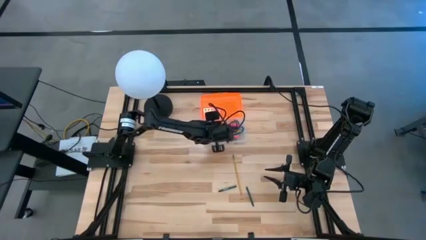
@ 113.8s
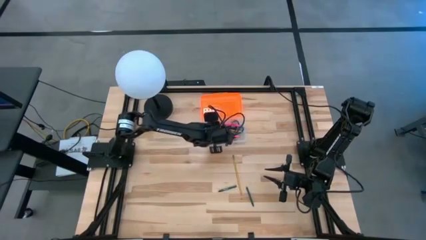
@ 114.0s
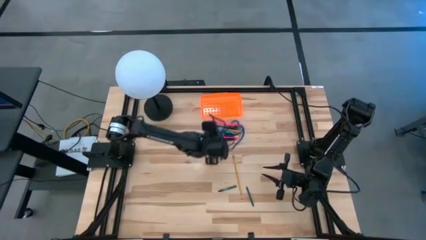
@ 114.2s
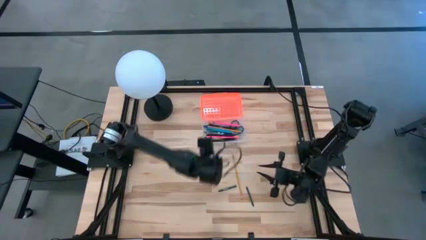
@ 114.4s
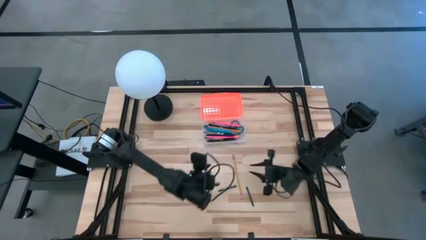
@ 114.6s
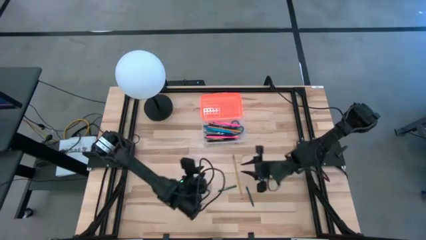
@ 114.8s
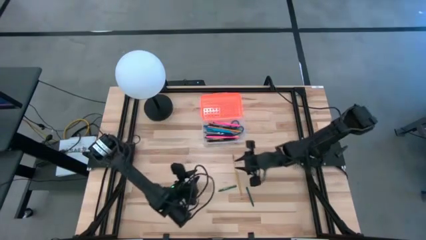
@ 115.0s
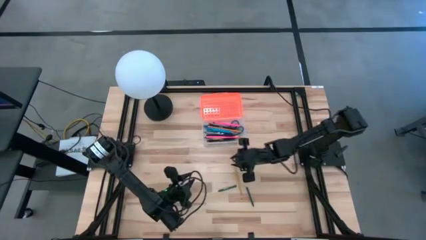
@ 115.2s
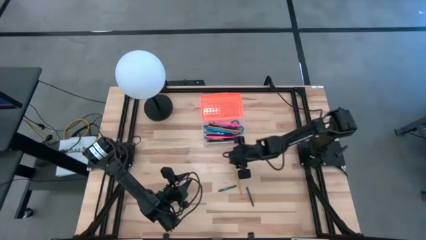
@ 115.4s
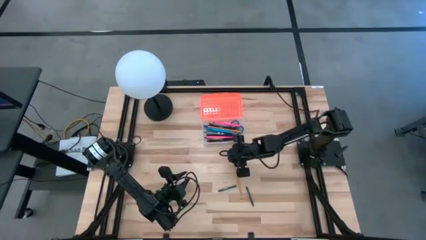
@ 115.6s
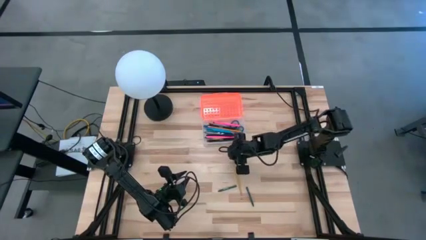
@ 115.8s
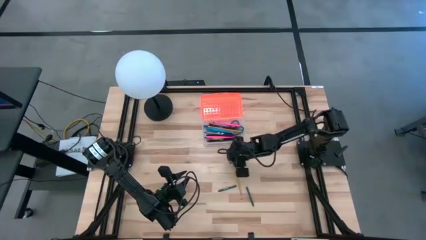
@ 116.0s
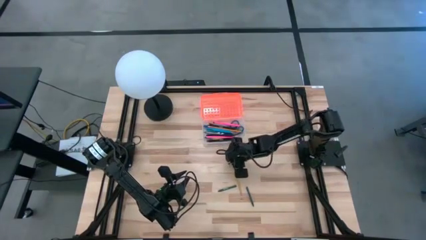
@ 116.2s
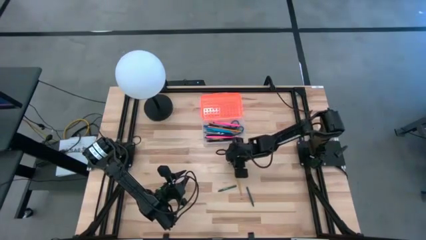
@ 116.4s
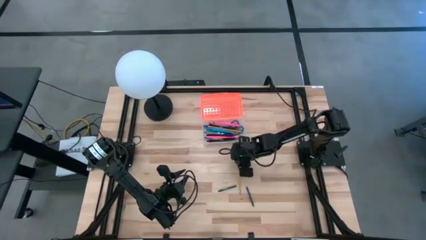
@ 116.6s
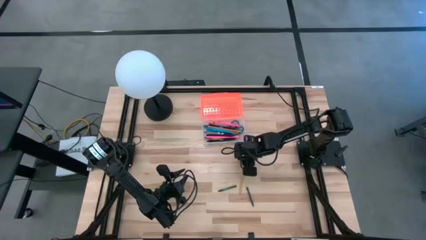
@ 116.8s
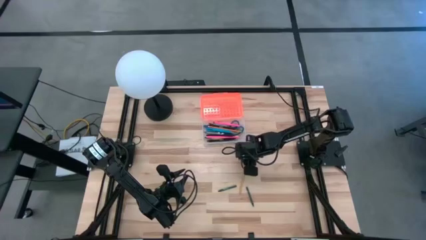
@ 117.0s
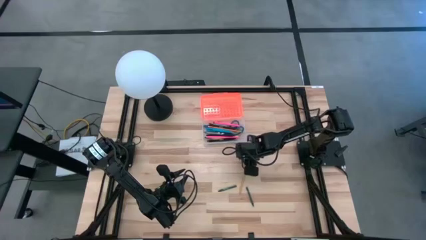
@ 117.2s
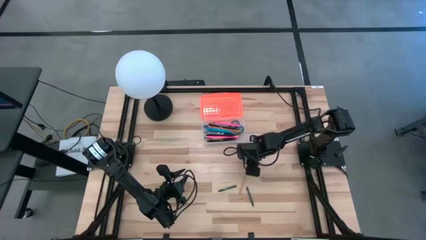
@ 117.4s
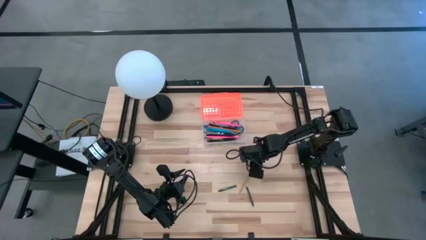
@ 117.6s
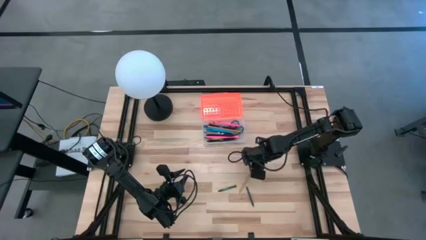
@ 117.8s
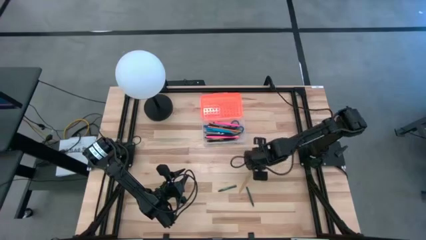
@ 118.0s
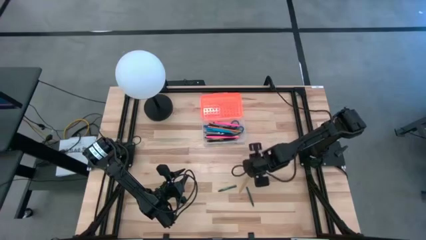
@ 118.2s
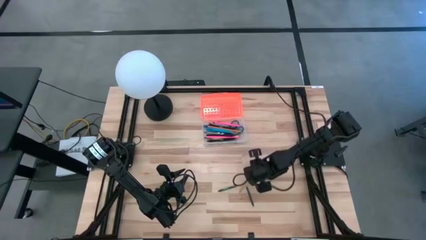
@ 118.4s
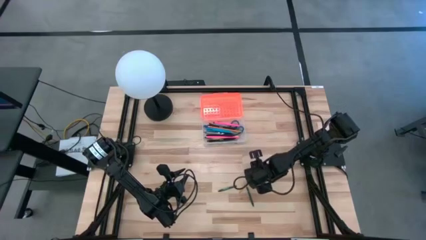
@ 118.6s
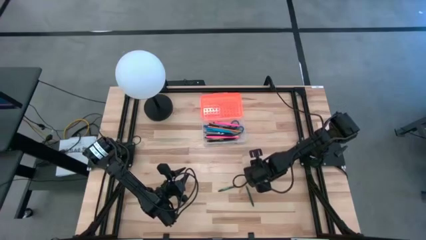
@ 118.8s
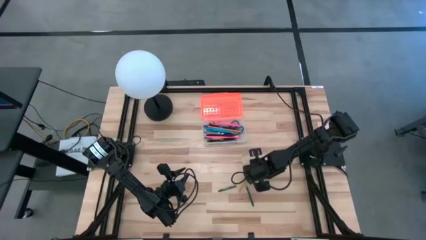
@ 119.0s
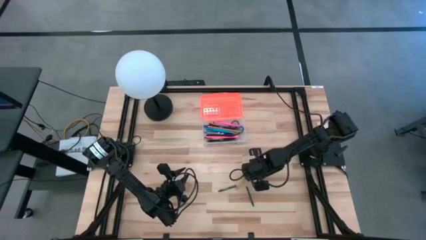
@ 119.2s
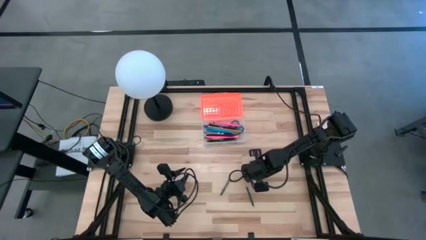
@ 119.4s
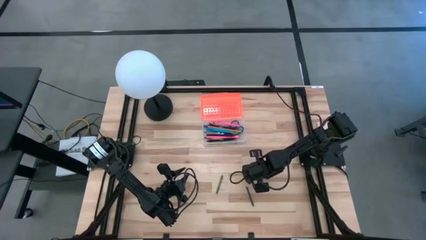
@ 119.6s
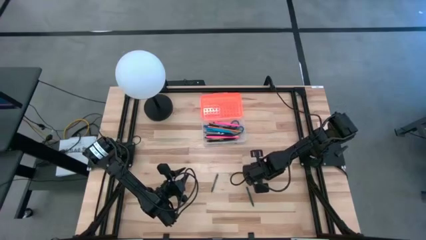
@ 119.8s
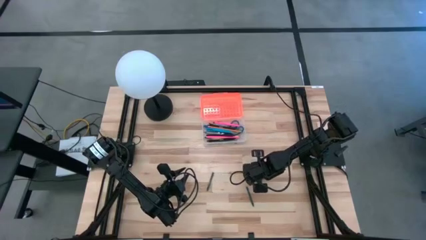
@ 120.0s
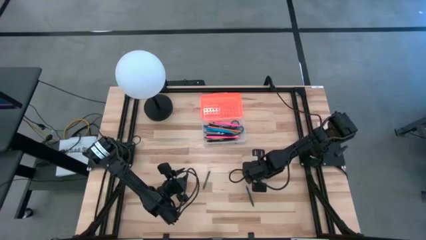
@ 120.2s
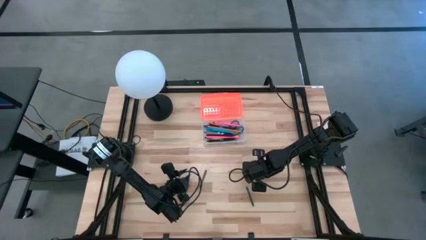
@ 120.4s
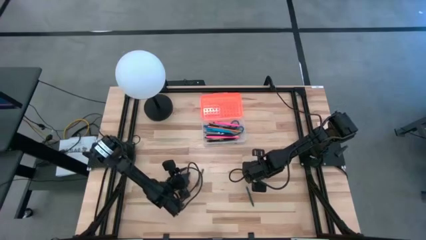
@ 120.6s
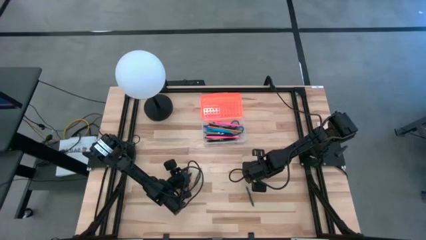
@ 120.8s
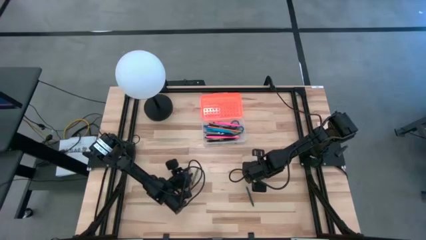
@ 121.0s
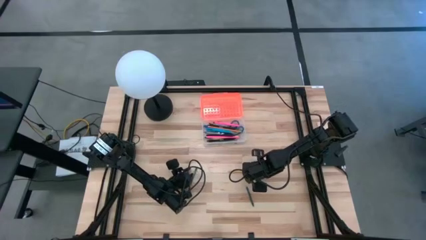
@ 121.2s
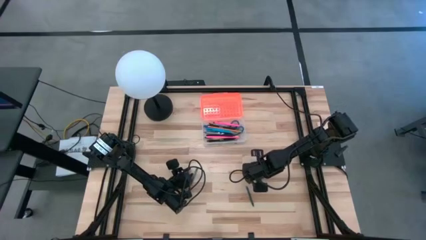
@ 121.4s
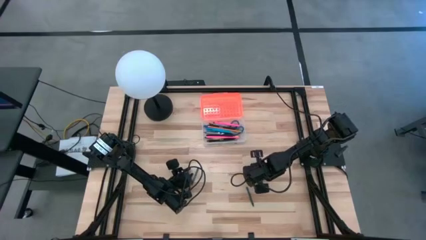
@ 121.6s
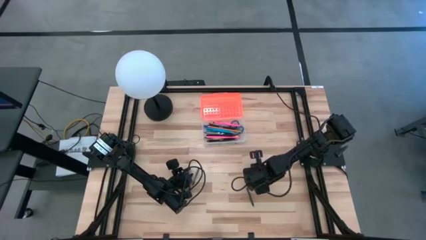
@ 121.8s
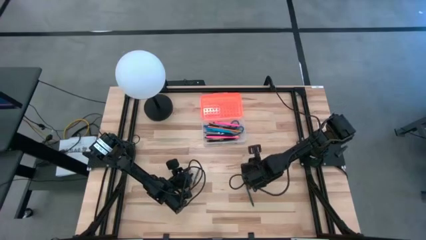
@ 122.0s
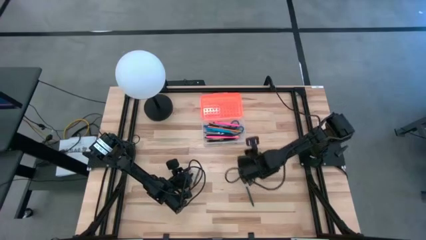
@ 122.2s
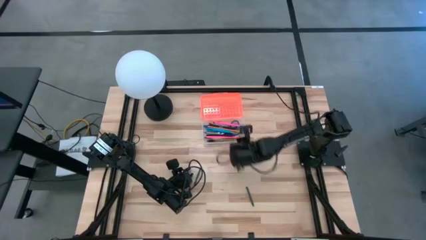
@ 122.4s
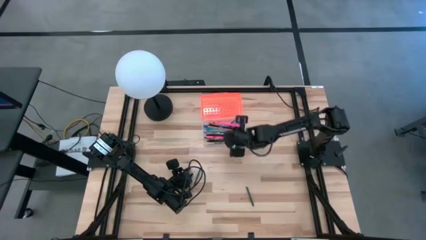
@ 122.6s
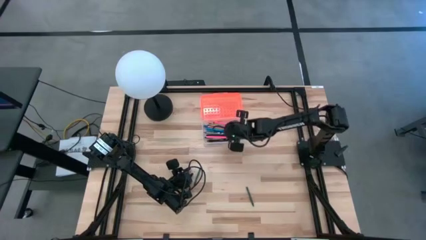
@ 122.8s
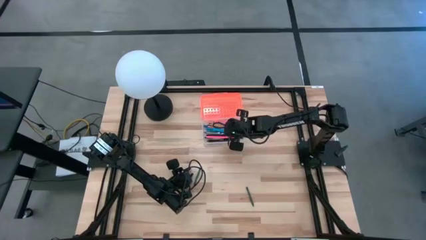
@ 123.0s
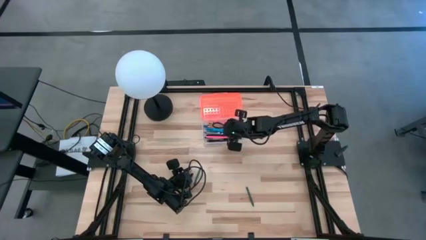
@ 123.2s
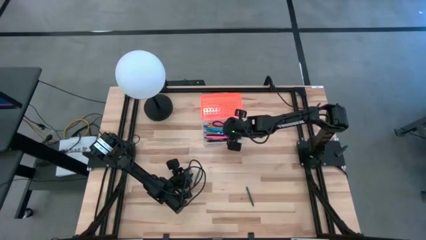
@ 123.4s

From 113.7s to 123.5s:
Task: Pick & place school supplies into a supply box
Put the yellow pencil into the orange supply box

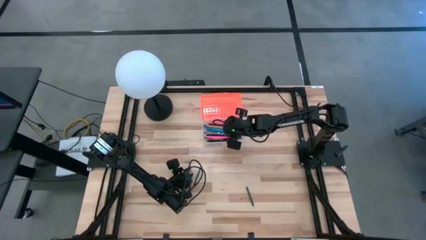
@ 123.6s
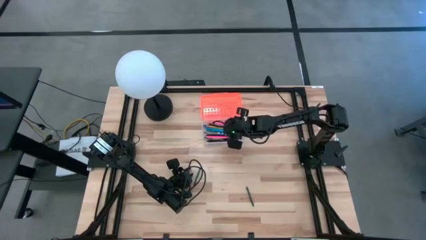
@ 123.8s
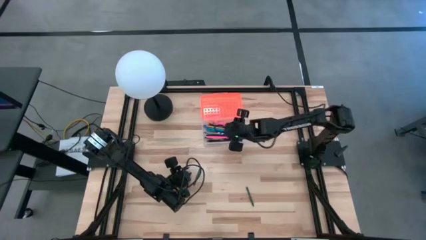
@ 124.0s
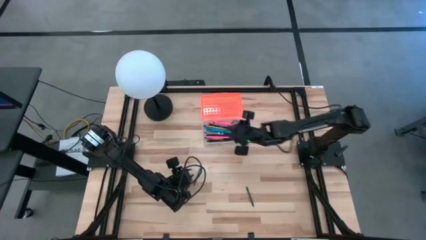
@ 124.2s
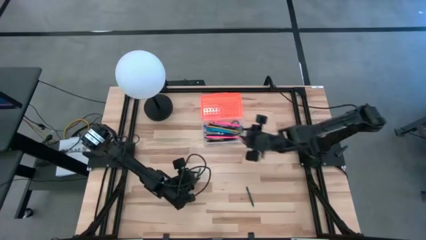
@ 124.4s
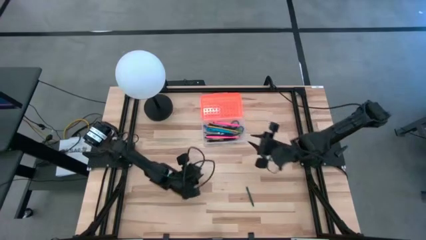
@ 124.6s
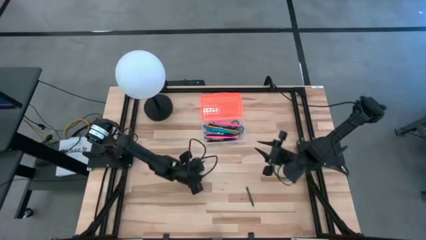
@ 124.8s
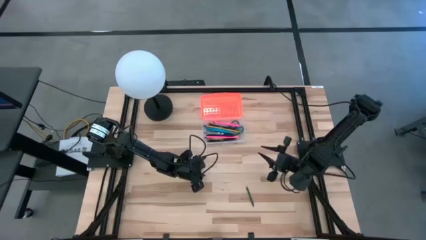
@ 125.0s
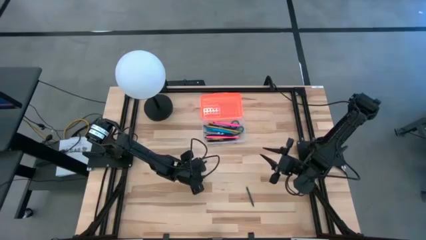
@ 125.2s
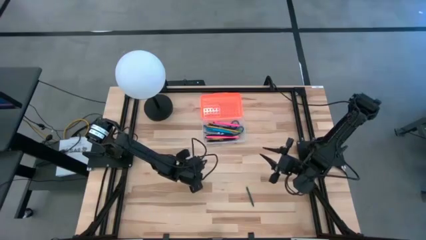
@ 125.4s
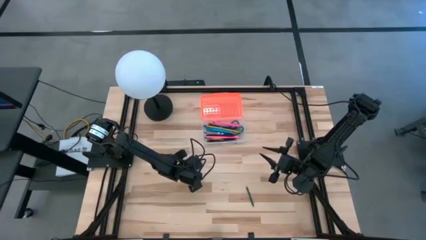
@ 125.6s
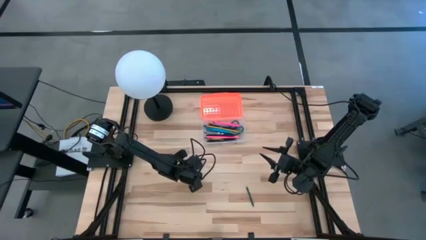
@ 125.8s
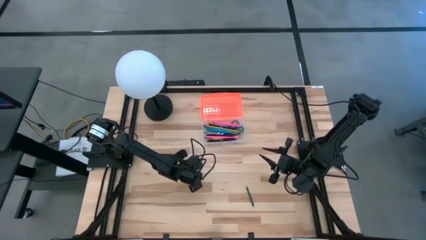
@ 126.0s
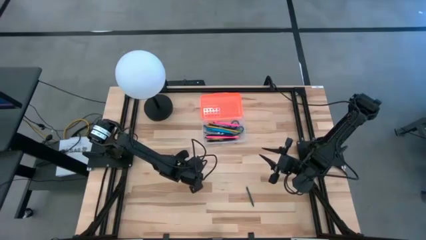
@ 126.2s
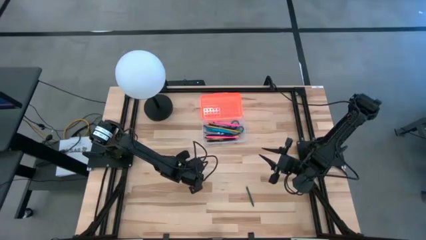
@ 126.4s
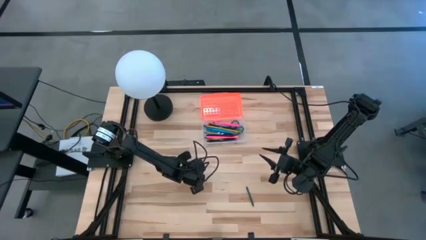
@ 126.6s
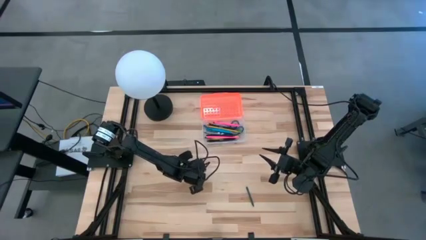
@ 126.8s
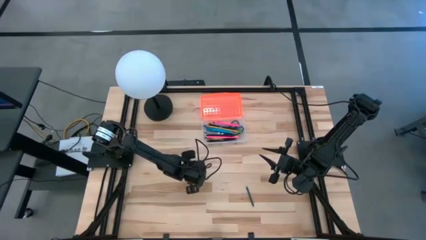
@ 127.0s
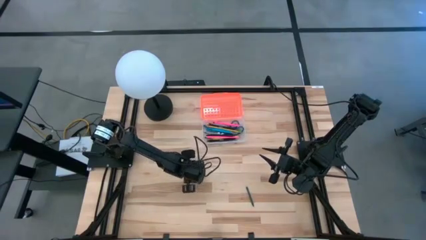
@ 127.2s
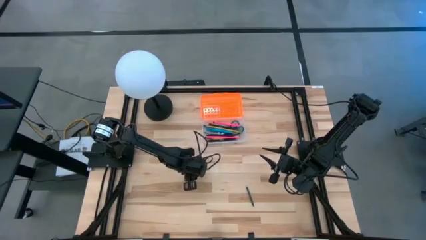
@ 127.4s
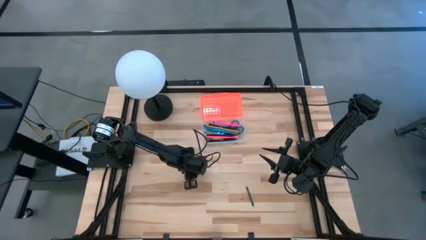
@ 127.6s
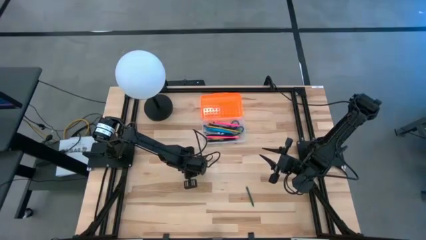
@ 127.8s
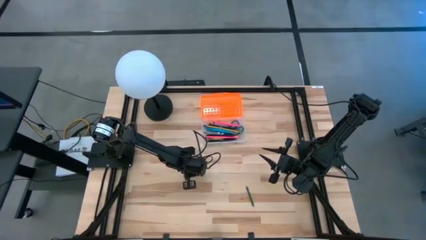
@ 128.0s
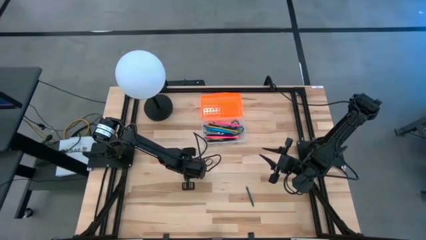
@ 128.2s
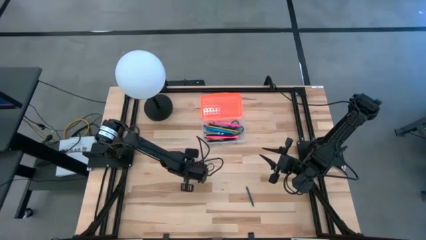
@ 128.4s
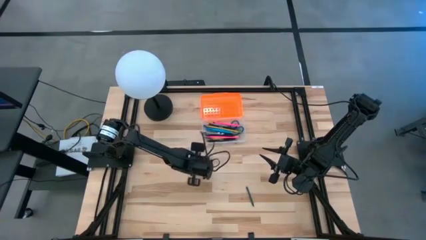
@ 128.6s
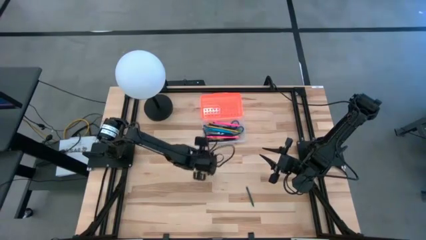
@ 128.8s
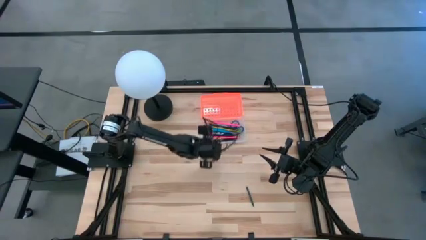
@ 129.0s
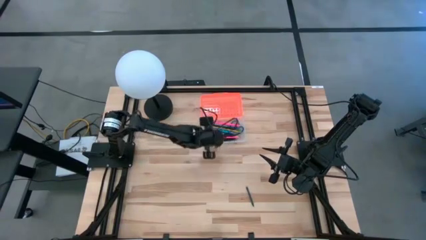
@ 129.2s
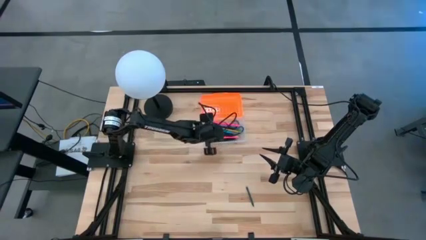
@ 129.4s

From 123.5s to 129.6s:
Put the green crayon into the orange supply box

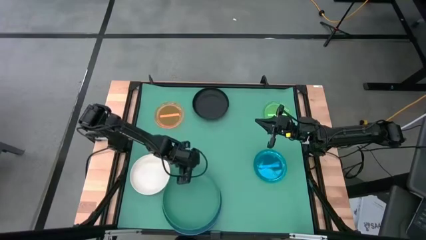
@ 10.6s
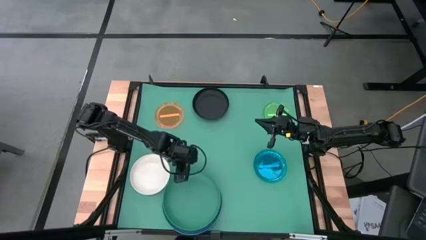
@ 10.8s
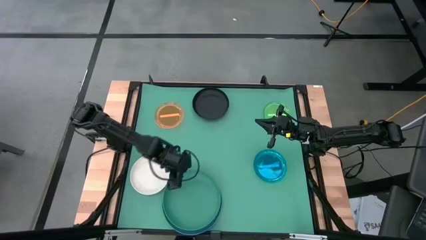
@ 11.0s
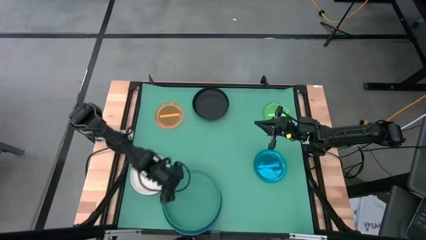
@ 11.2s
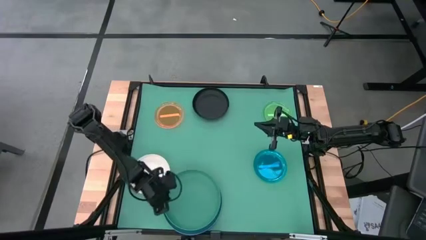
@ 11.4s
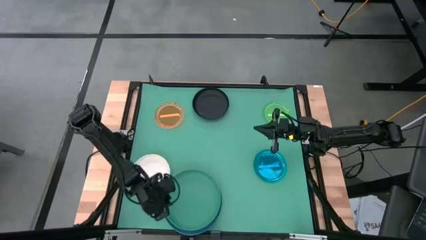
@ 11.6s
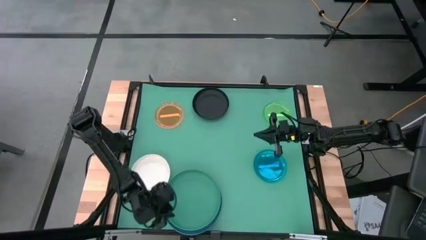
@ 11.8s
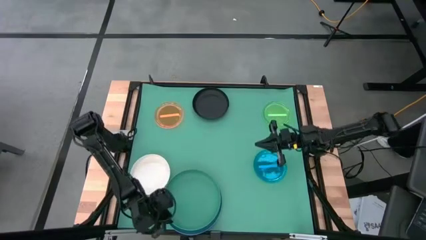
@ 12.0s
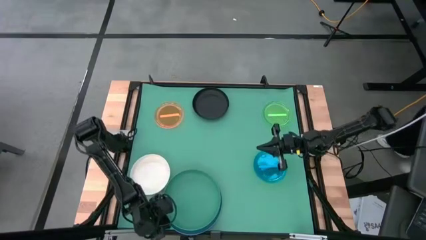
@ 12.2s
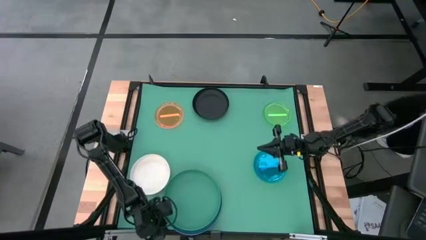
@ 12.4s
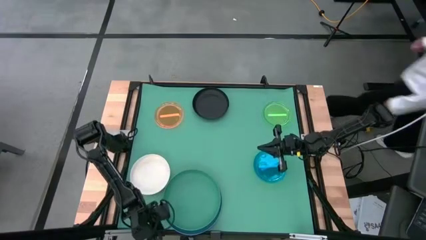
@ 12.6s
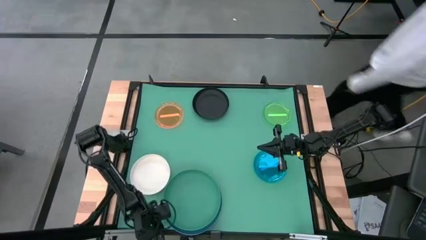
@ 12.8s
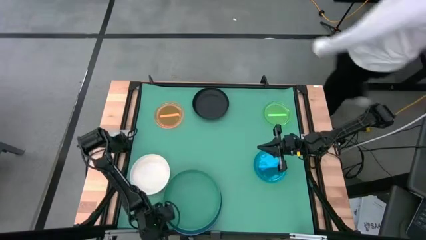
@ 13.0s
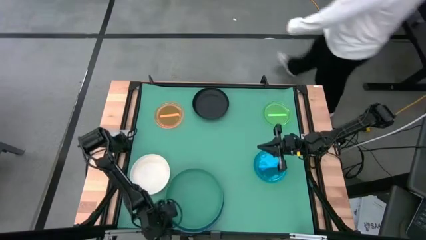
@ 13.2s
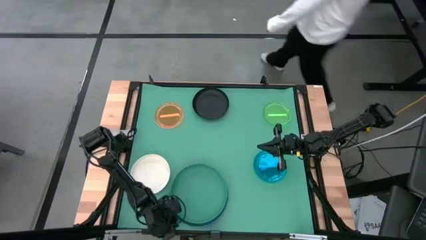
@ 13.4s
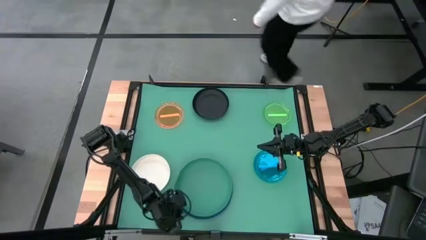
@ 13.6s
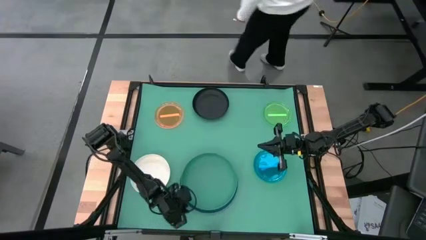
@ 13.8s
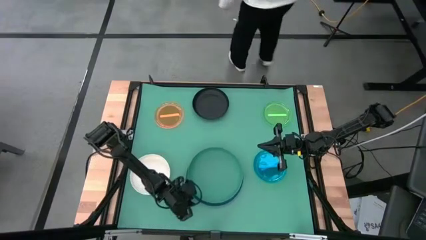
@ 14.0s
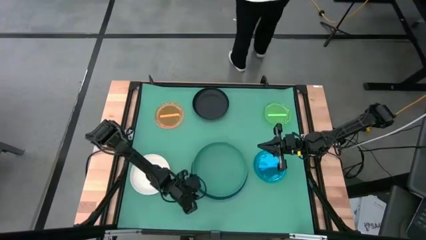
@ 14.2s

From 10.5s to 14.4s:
Task: Stack plastic plates
Move the stacked plates to the center of the table
